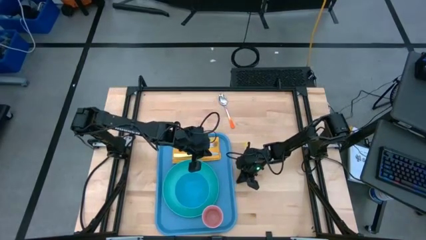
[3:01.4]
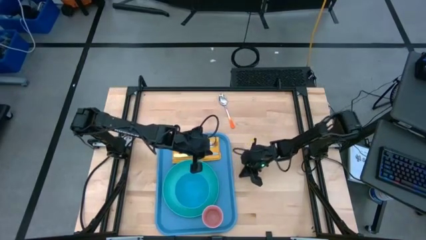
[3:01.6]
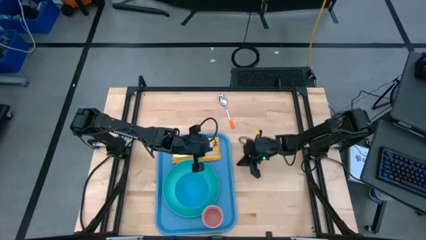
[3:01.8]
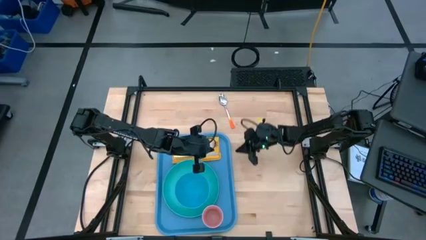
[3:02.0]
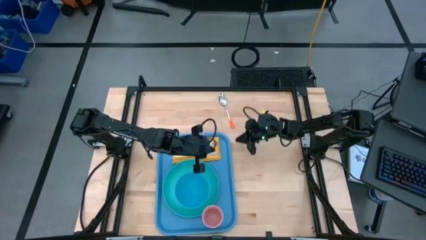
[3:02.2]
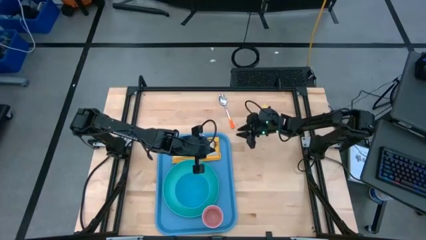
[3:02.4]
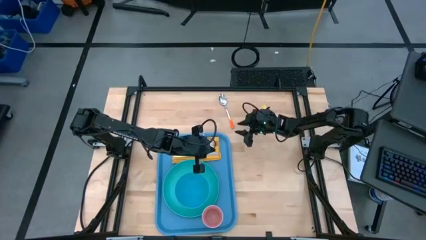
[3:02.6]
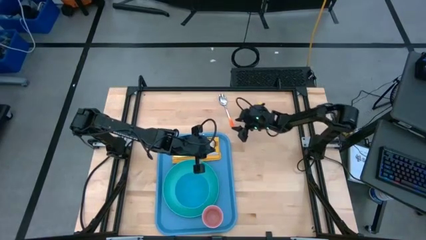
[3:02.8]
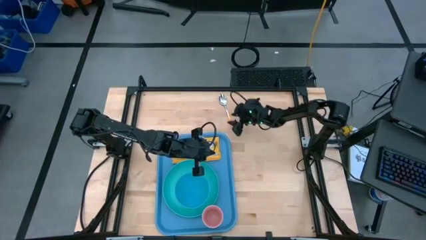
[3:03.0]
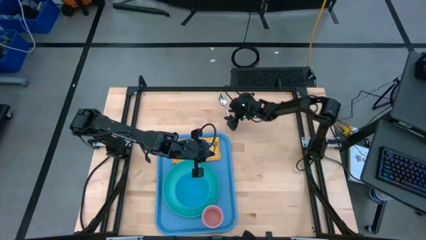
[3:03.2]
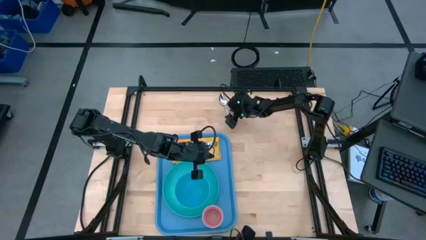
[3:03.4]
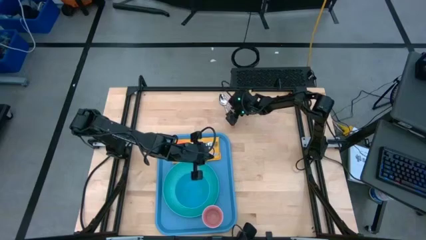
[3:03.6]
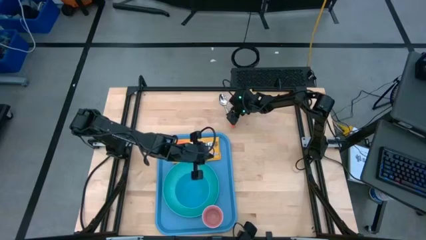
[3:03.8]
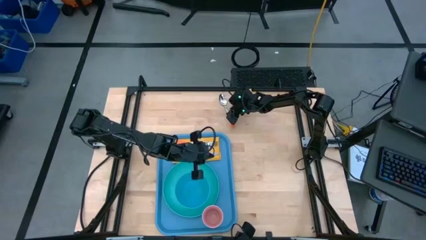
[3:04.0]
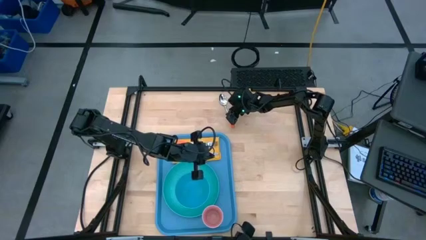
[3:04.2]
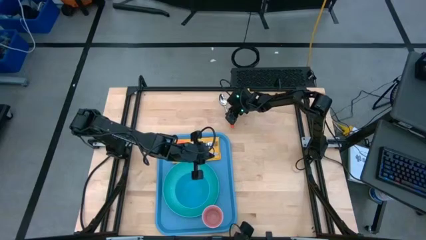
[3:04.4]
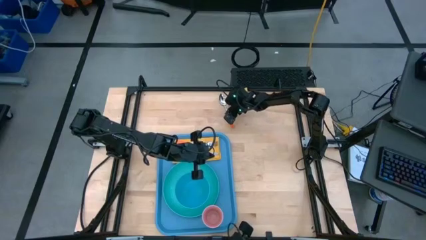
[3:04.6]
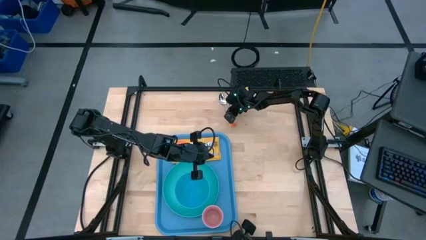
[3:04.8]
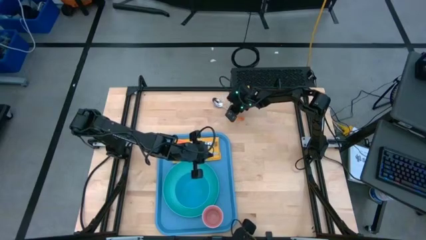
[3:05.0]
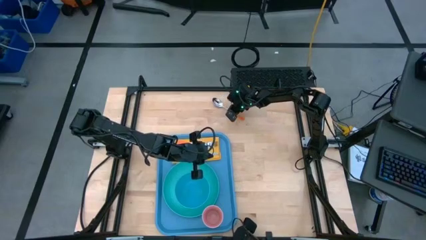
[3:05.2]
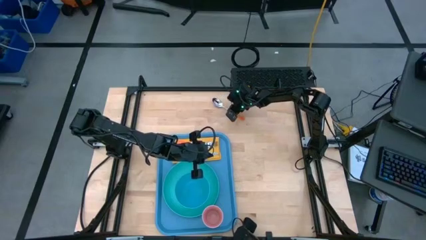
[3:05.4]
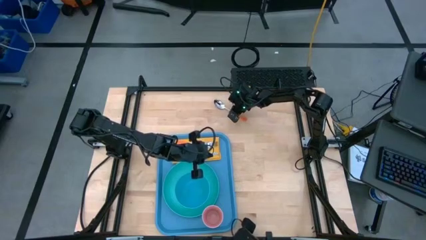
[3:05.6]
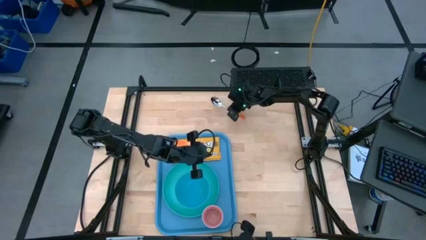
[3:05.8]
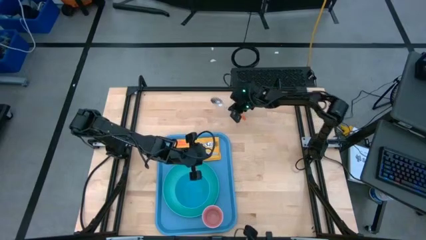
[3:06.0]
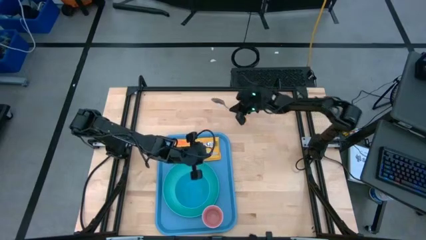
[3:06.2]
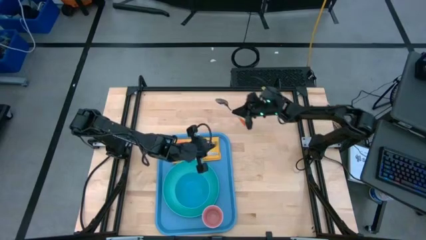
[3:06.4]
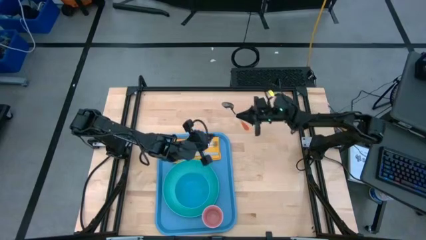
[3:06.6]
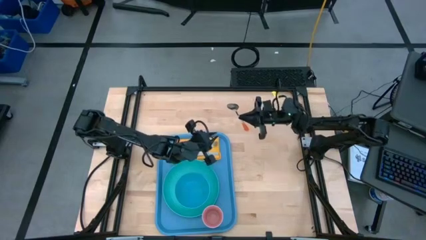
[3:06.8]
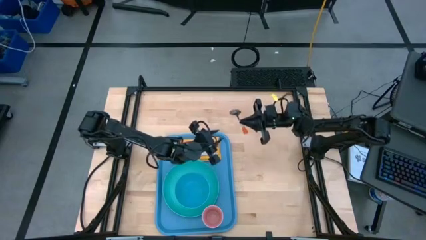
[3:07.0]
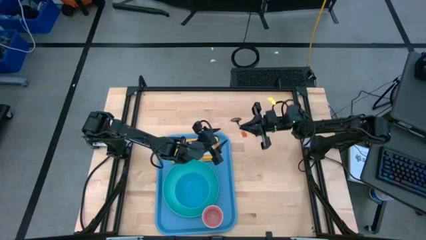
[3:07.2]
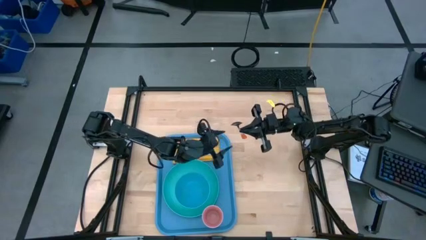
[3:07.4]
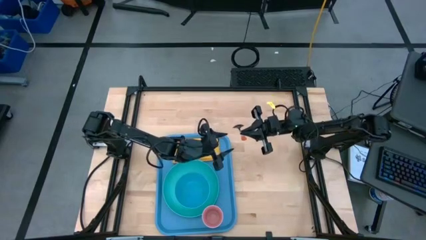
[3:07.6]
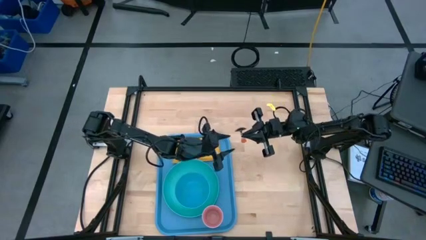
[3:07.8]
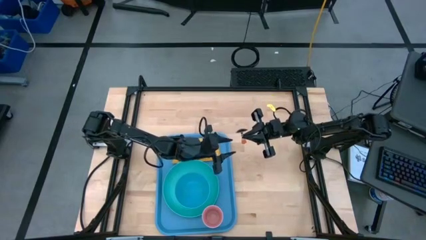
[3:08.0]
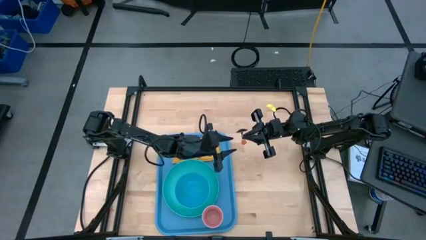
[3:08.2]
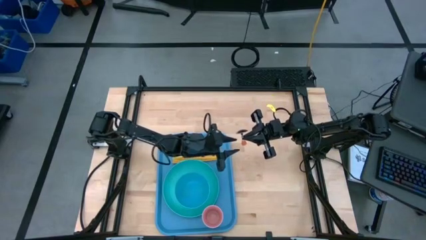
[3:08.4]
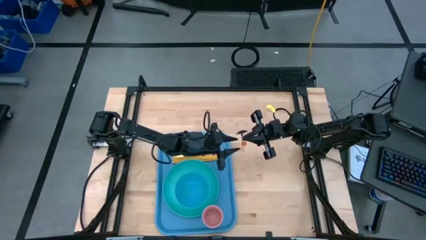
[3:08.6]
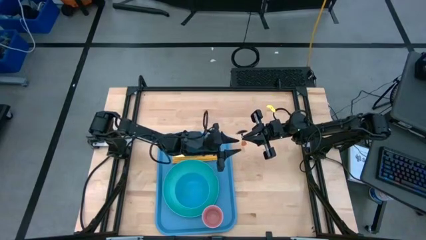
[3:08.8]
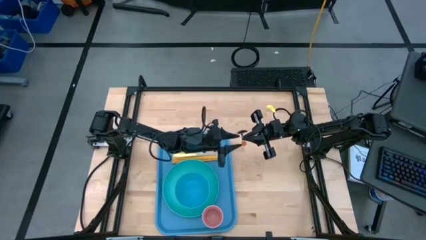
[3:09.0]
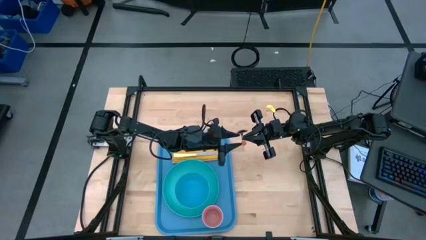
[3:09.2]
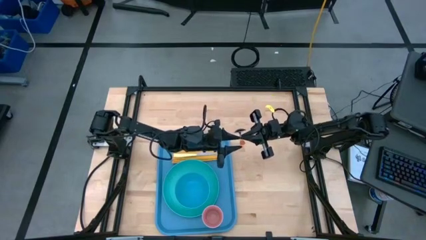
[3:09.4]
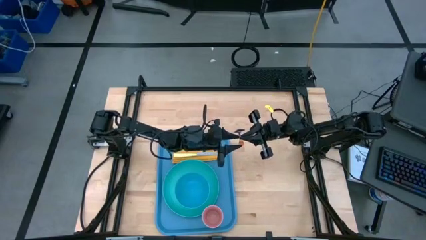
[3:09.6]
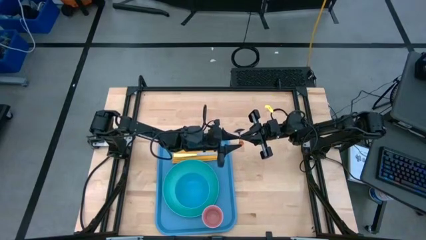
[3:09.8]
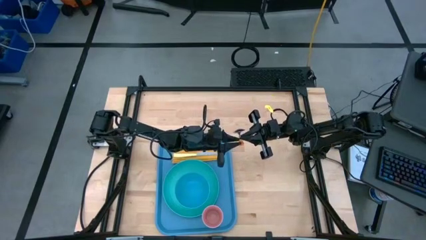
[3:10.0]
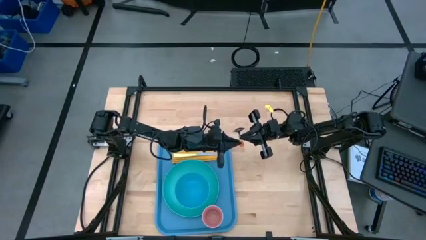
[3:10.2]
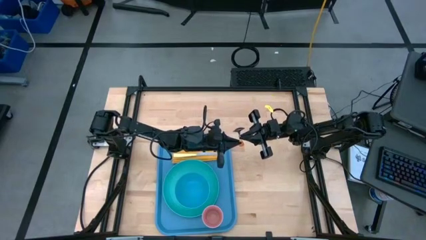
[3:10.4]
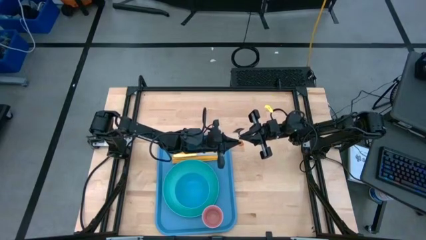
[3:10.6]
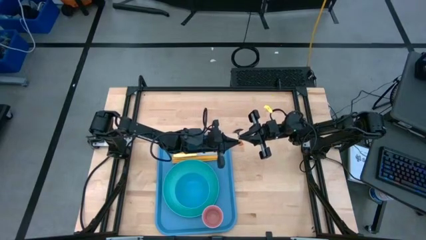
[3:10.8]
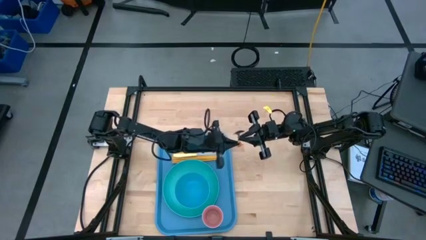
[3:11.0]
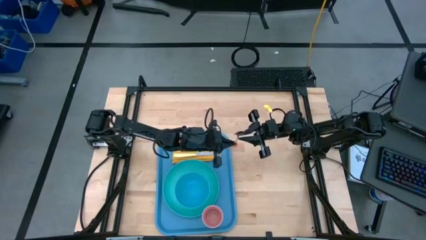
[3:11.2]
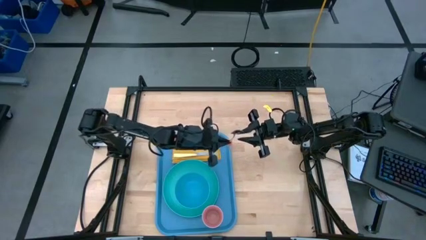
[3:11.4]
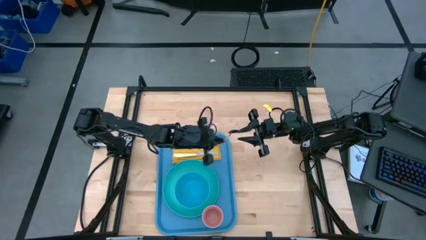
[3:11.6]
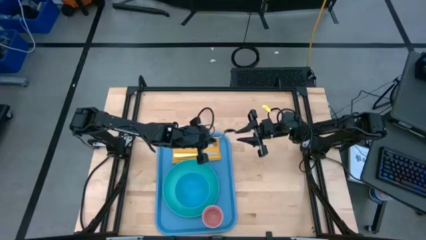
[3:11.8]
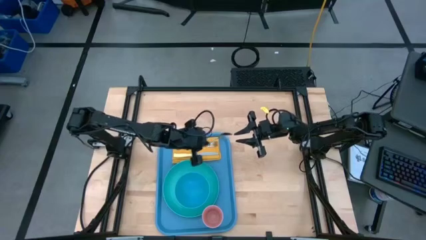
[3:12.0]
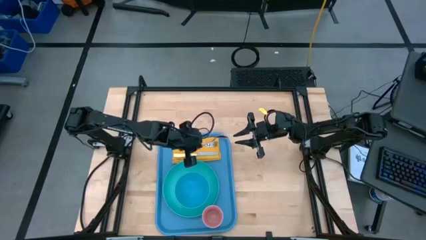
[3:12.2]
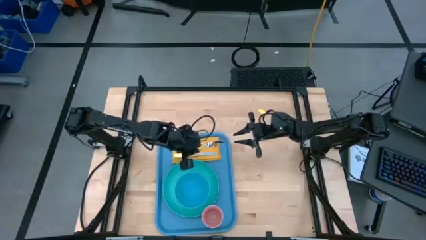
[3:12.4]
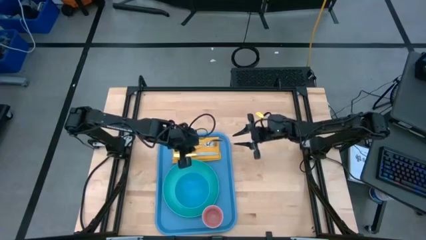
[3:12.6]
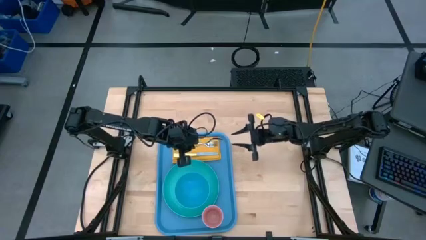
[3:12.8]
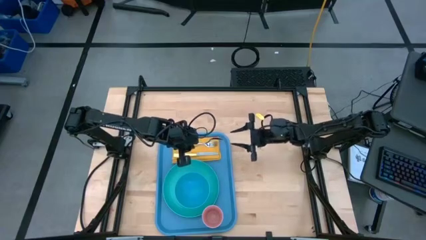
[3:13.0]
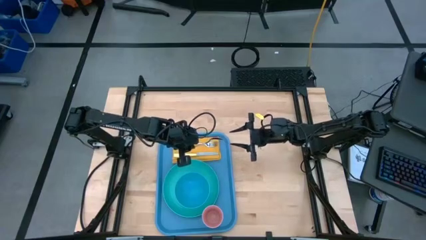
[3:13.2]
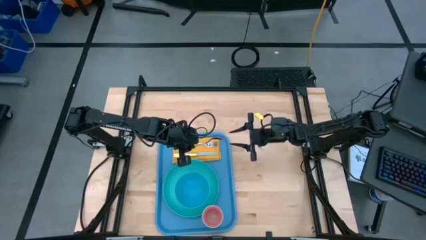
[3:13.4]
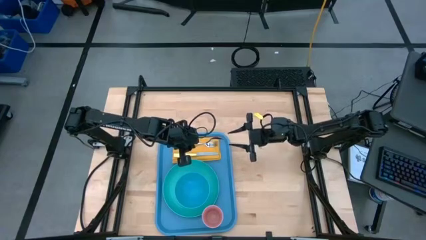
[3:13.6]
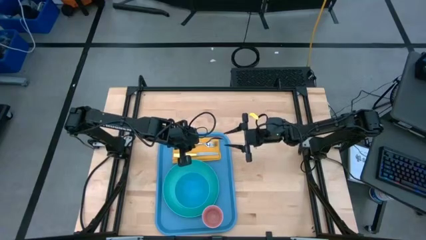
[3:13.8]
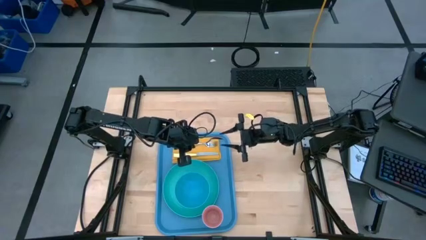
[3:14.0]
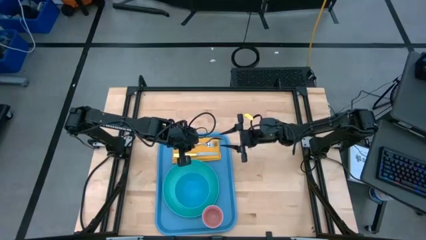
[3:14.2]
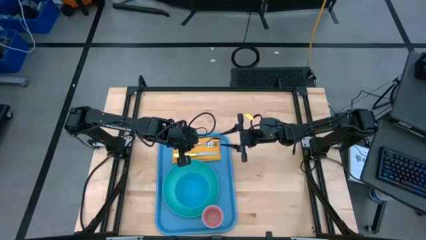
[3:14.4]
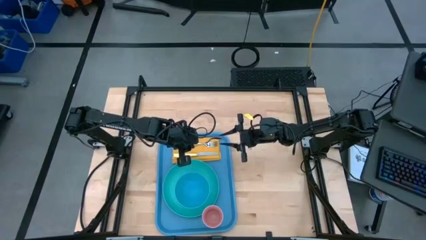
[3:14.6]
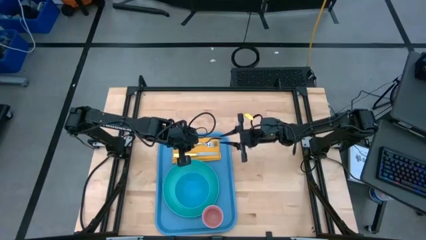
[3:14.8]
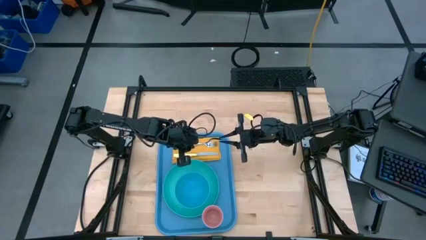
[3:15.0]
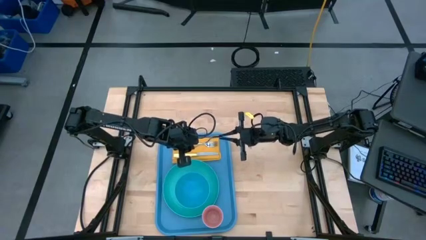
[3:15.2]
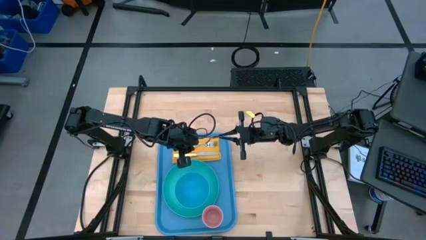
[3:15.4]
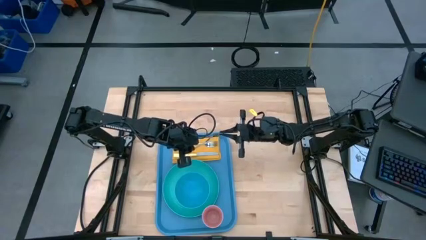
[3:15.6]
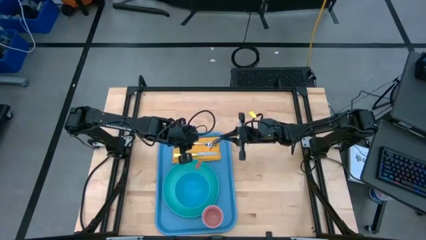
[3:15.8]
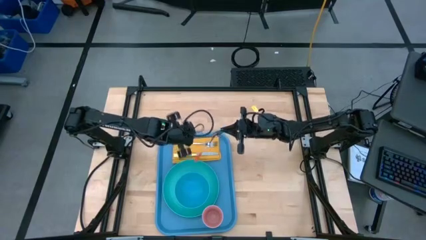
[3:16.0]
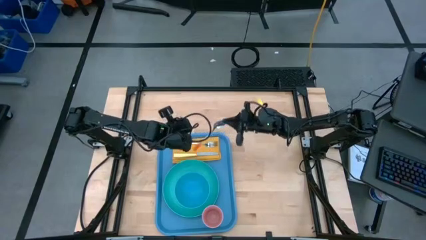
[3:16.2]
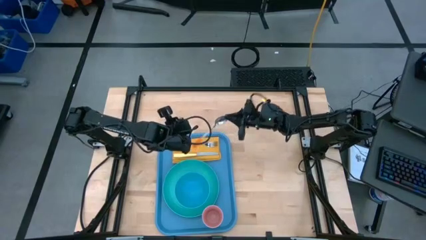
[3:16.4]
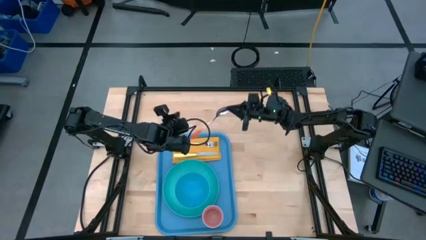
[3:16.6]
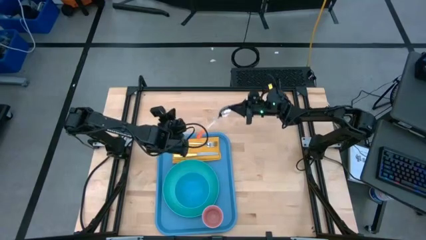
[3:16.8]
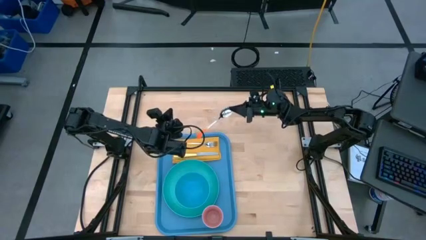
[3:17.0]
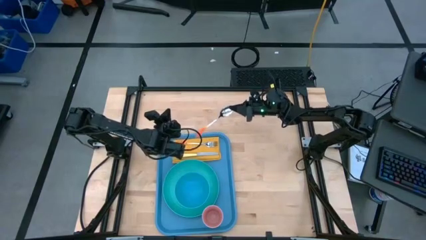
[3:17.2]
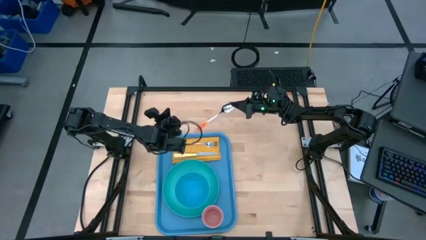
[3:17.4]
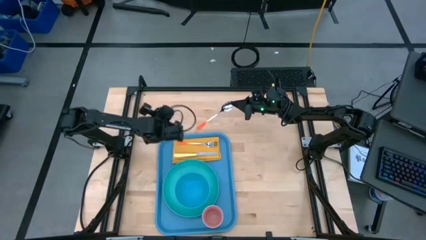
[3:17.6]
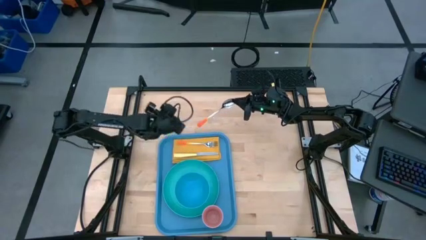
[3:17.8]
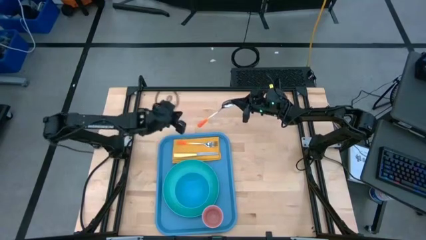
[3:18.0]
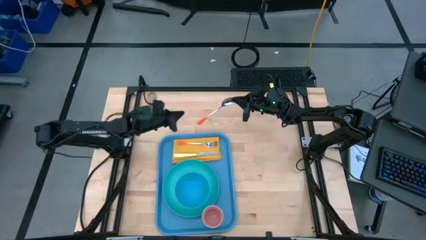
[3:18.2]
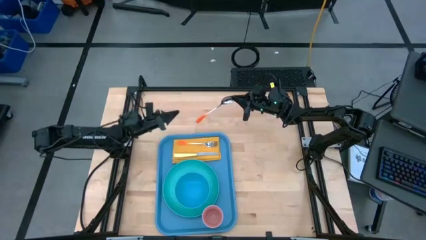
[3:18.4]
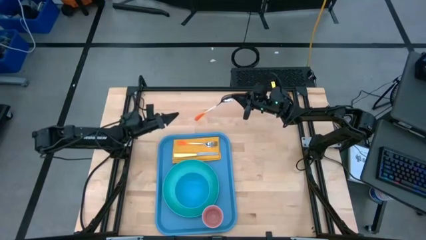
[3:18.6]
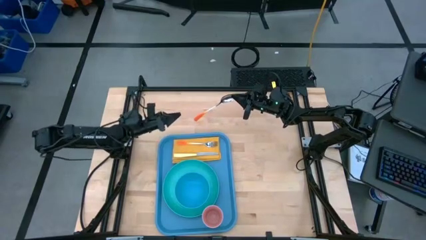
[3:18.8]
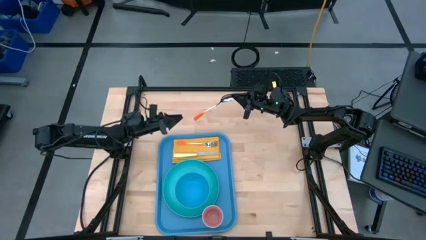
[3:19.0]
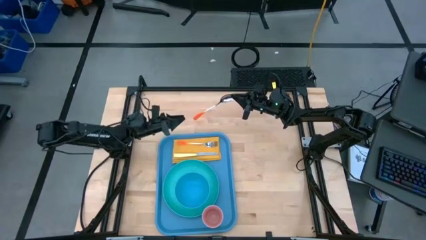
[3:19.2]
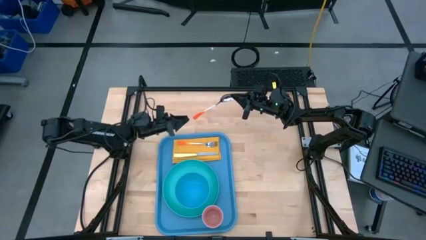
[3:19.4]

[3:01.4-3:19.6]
Task: Set up tray
Put the orange spoon in between the yellow knife and the orange fork on the yellow napkin on the blue serving tray
